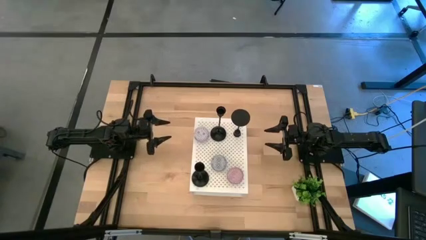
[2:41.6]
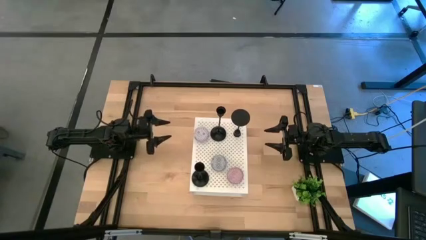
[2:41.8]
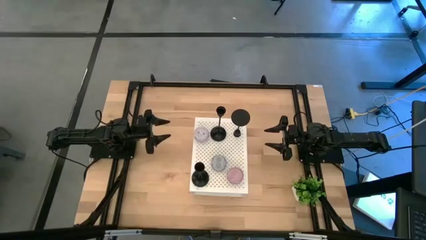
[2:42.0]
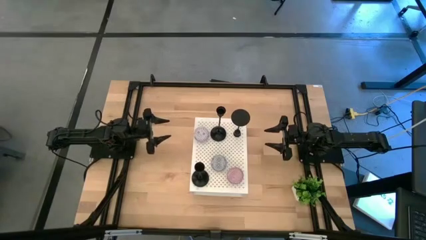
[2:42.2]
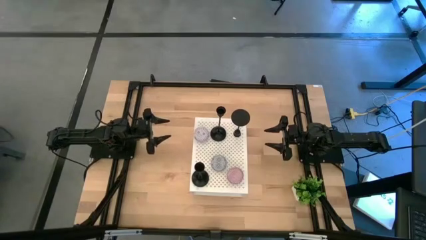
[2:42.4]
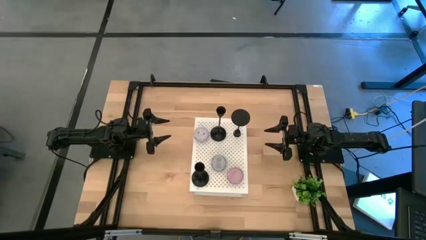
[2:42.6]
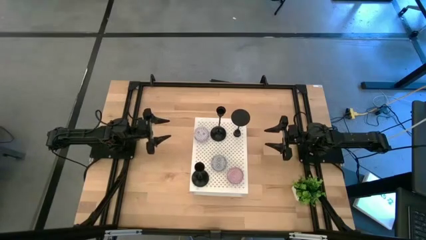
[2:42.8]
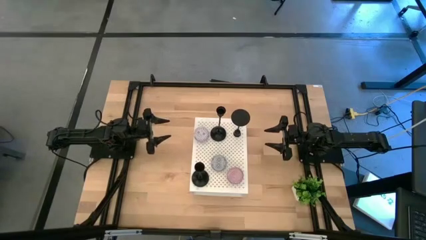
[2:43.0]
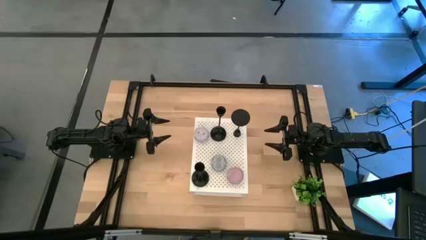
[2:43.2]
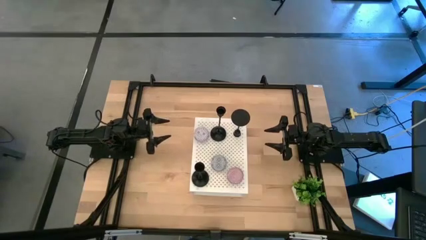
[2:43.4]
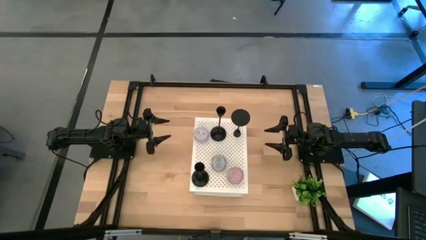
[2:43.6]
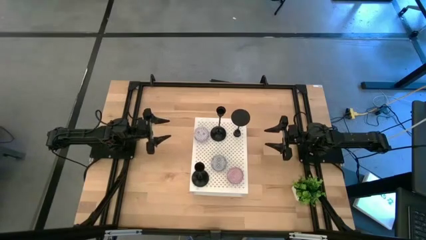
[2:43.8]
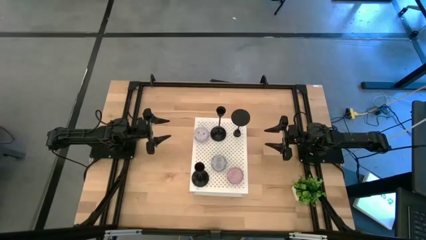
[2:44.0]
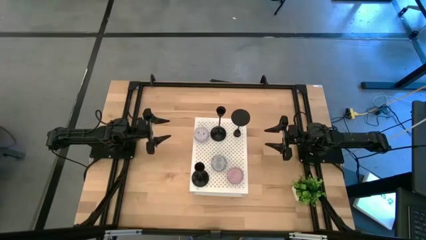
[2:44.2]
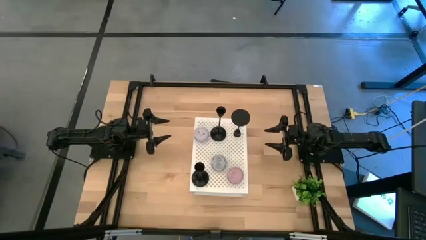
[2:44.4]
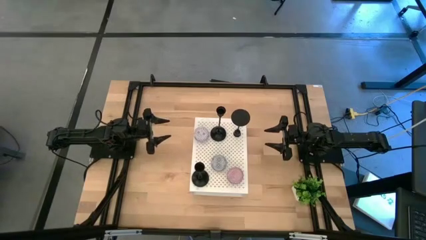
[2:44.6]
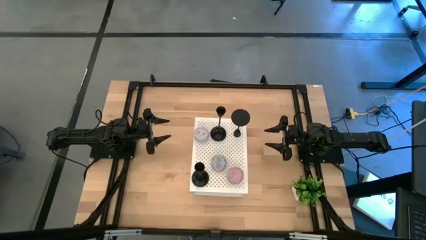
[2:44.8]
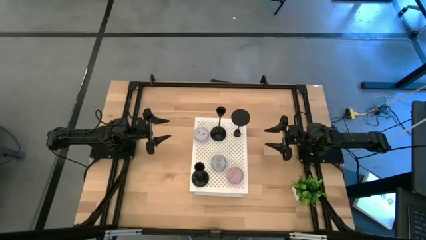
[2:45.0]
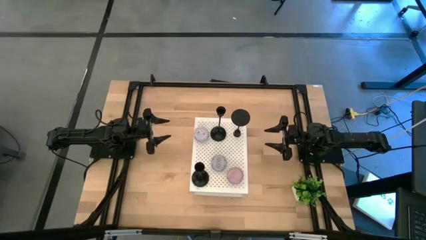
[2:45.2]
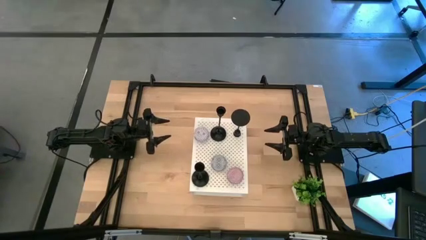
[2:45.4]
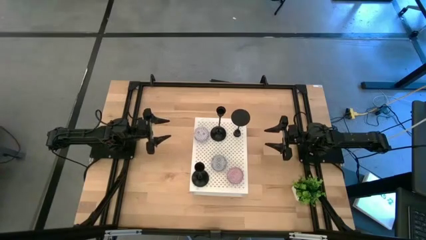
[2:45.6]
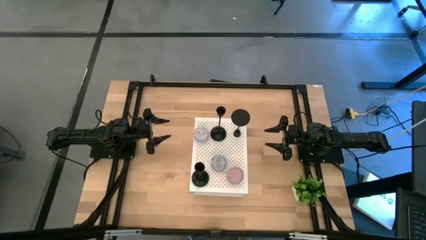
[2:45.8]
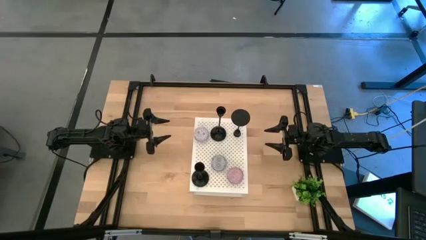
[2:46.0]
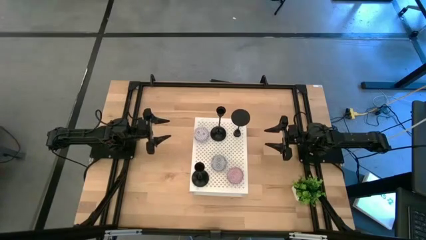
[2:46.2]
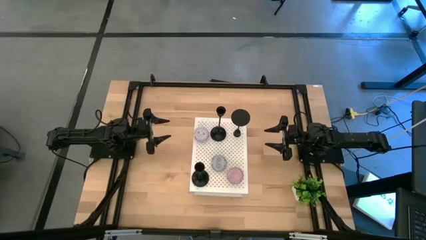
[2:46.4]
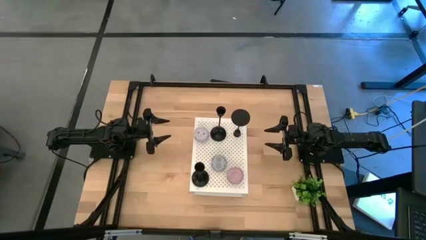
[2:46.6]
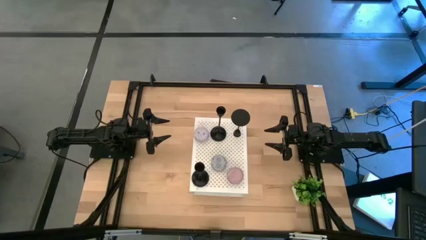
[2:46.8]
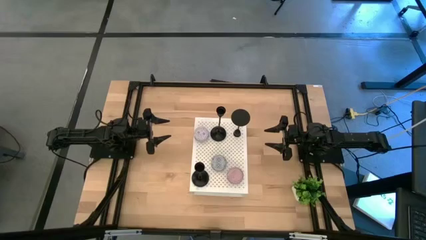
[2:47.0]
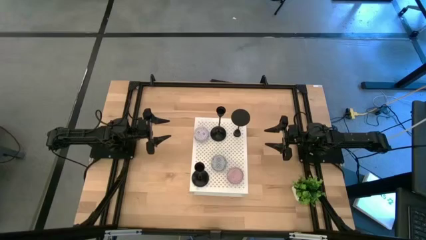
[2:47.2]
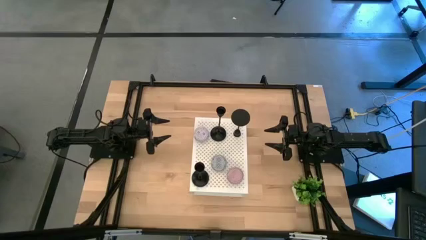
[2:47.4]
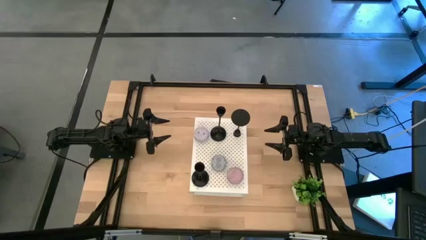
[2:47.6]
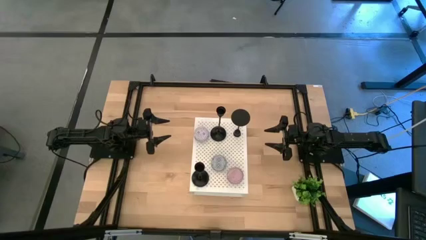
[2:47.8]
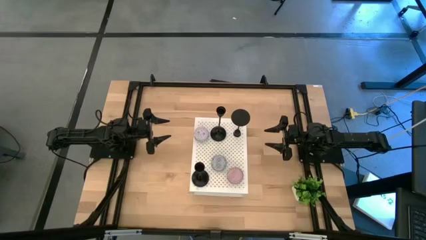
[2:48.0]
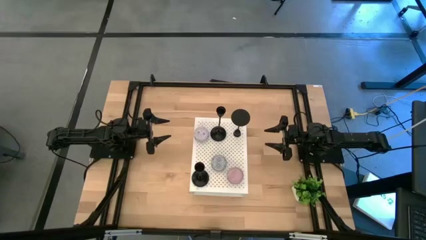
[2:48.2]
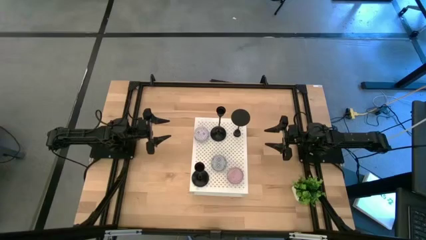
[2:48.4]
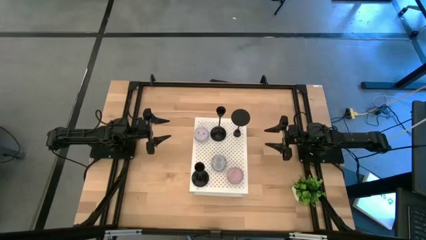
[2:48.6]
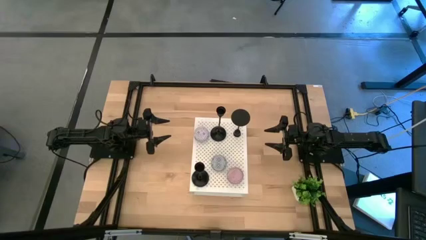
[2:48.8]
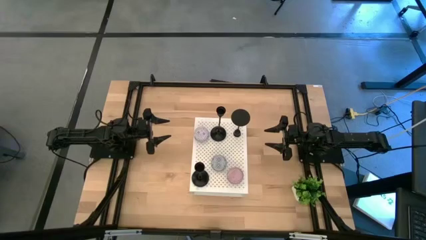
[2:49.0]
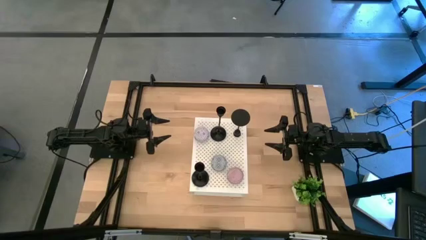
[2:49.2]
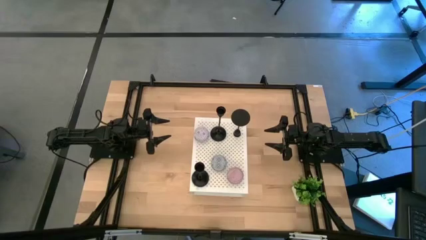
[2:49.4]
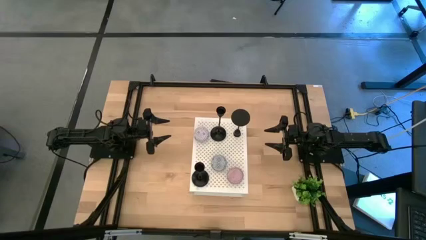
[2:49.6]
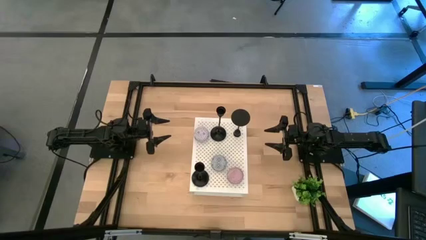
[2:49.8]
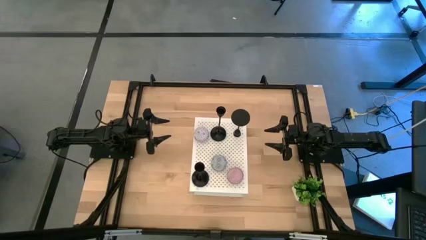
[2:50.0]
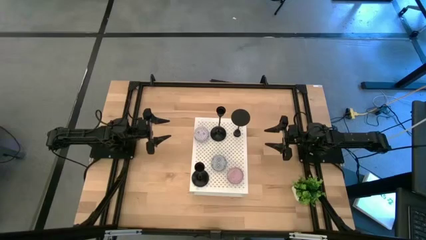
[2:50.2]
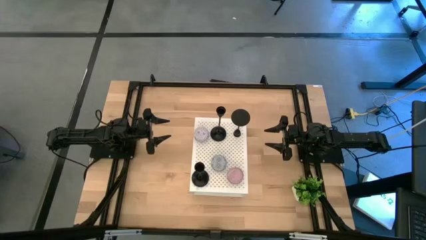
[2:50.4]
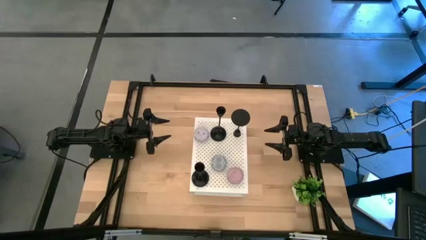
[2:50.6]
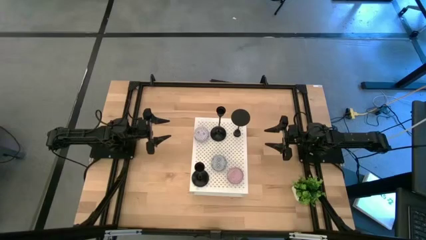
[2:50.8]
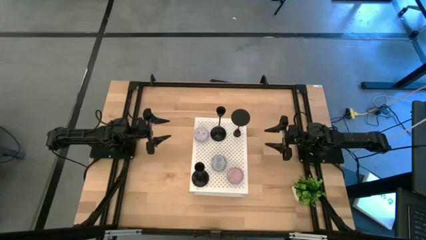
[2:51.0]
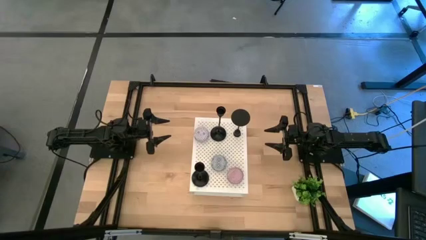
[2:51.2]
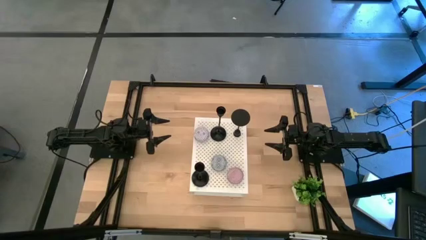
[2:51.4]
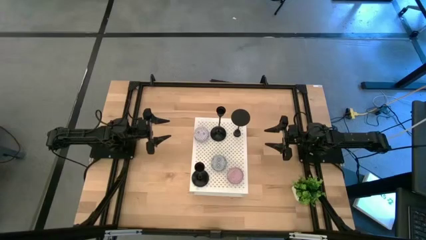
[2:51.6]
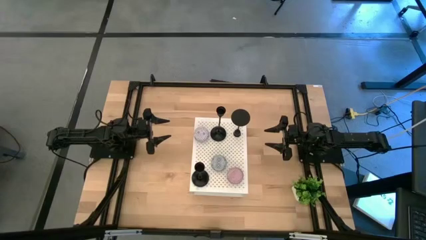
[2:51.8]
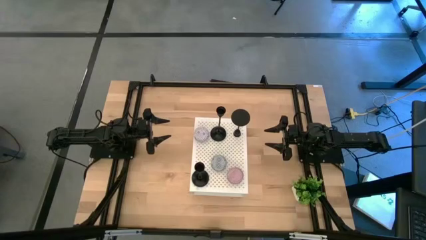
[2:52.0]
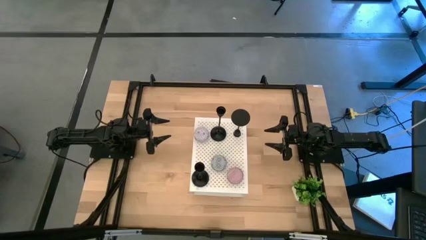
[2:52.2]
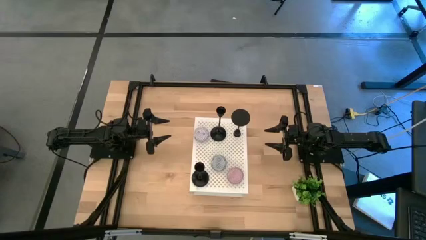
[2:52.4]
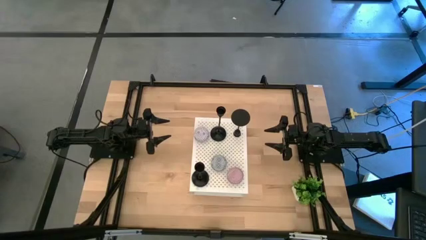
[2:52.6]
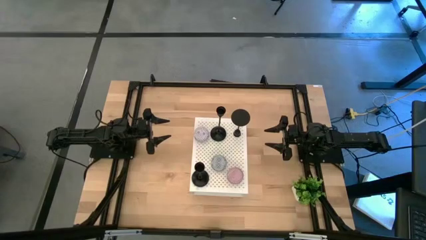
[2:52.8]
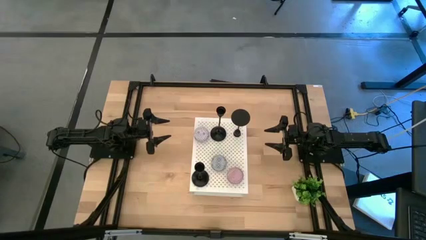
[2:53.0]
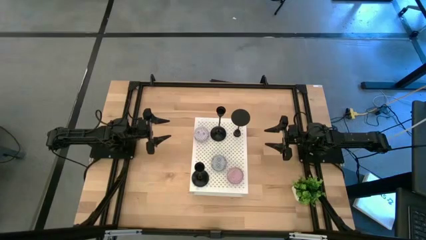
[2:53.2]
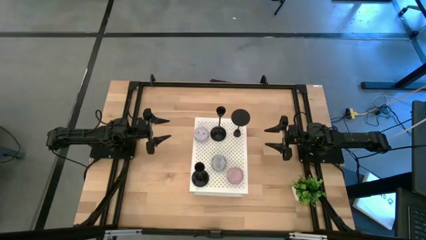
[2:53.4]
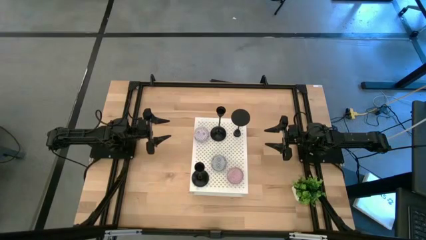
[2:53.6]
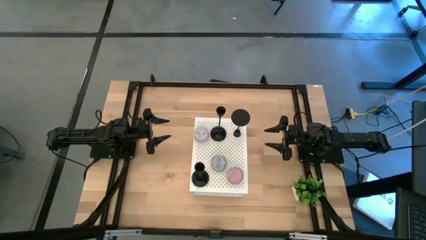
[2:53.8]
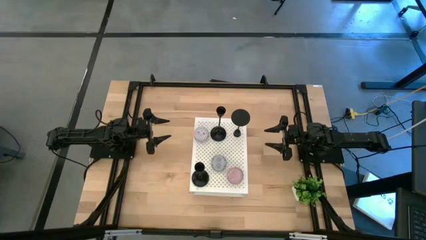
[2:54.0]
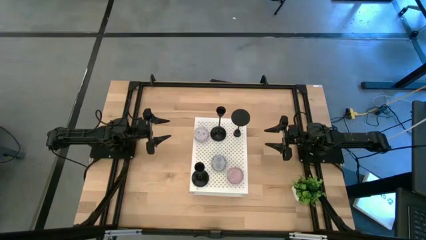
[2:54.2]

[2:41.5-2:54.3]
Task: Pick & Place candle stick holders
Return to Home Position
